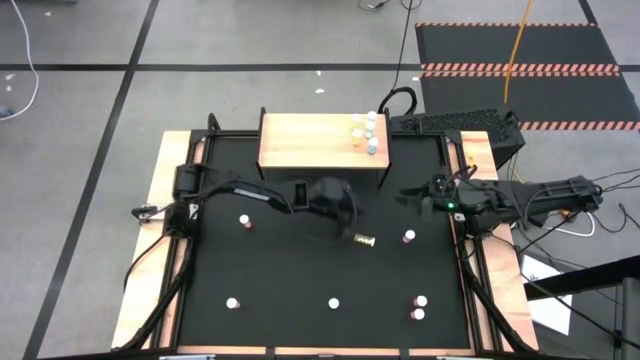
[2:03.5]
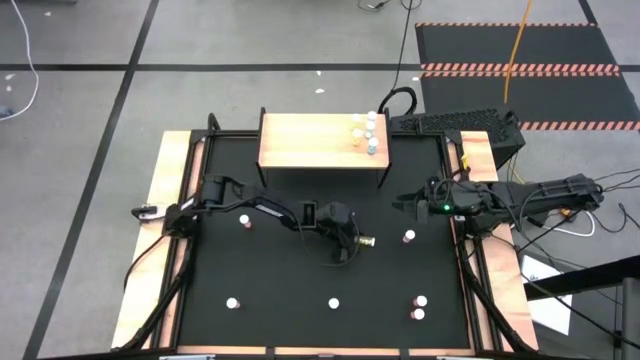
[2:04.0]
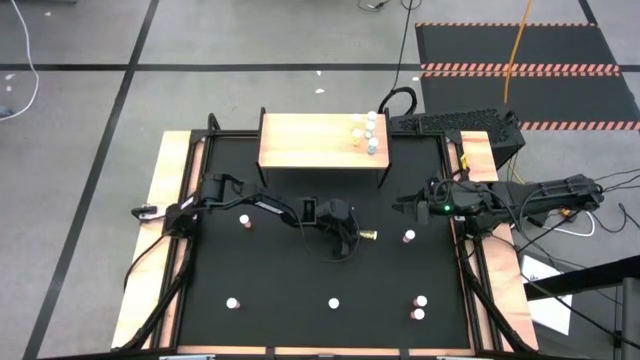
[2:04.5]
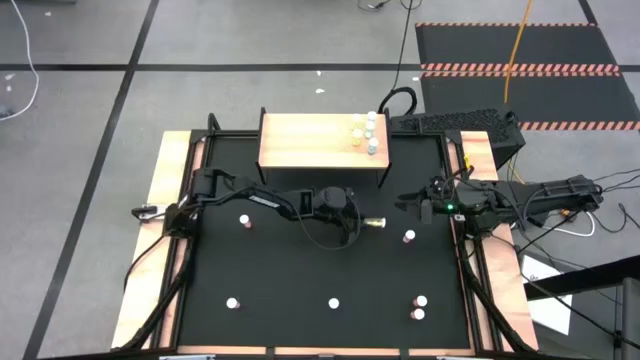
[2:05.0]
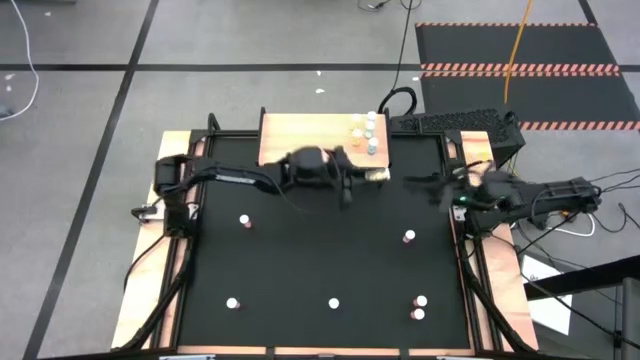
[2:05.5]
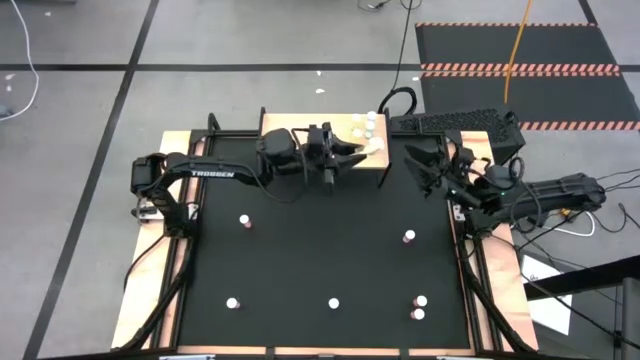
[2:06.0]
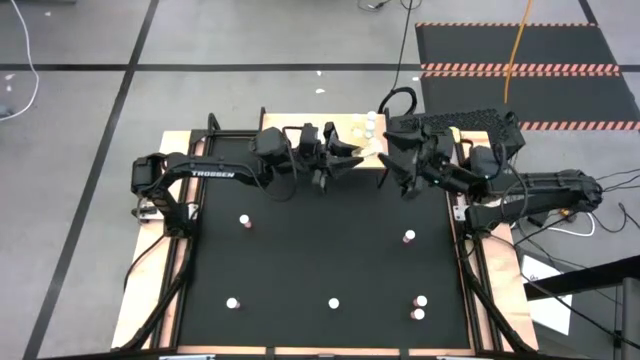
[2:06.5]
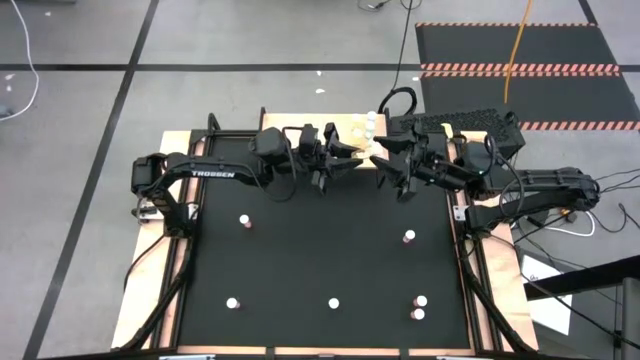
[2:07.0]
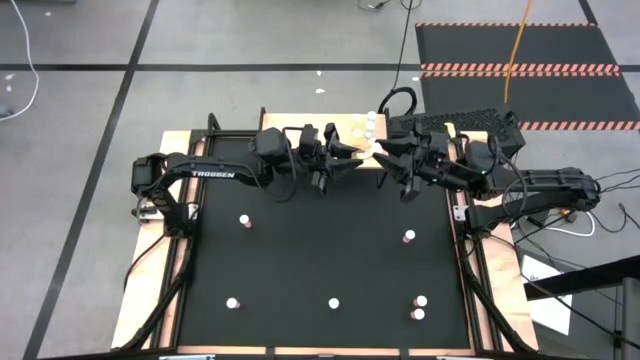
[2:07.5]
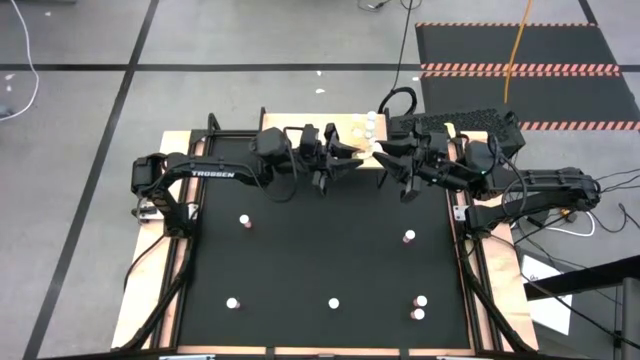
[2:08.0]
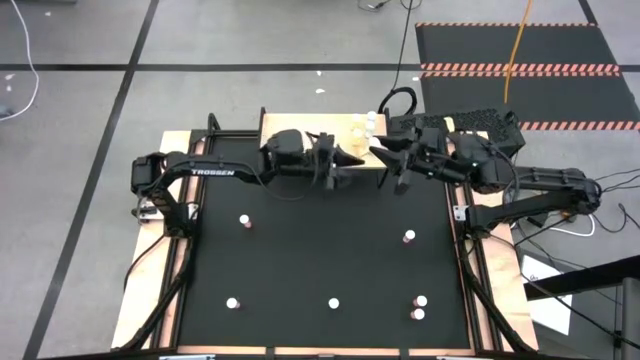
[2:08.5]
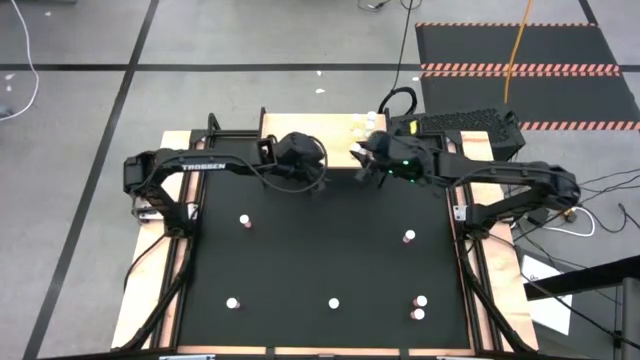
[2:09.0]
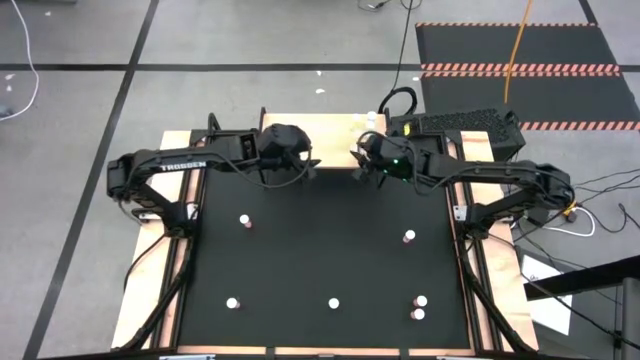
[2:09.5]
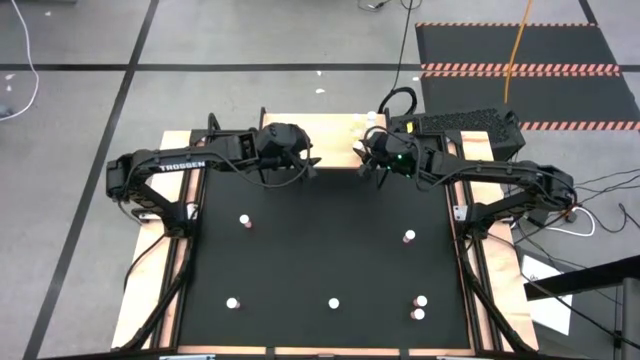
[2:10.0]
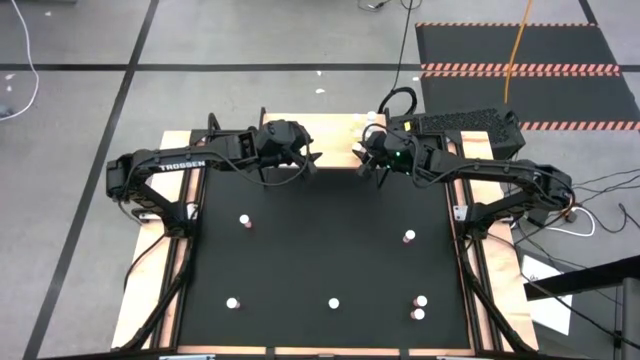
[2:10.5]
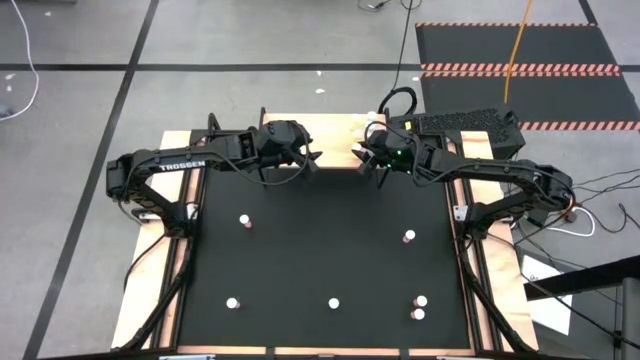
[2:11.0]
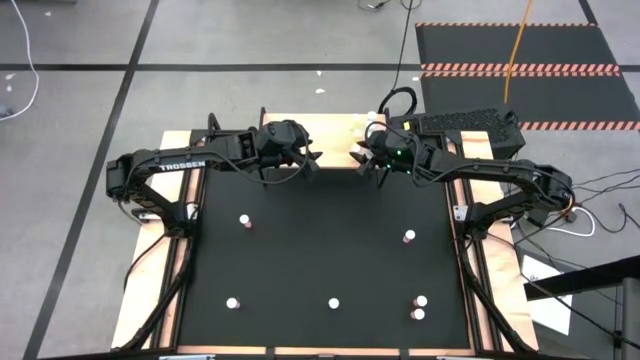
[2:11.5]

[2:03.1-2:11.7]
Task: Pick and place medicine bottles onto shelf by color
Put the yellow pill bottle on the shelf aligned with the other yellow pill bottles

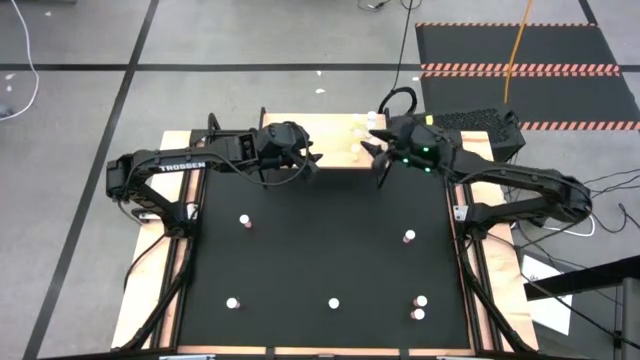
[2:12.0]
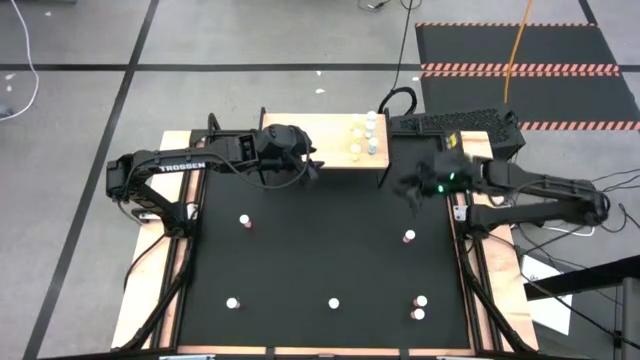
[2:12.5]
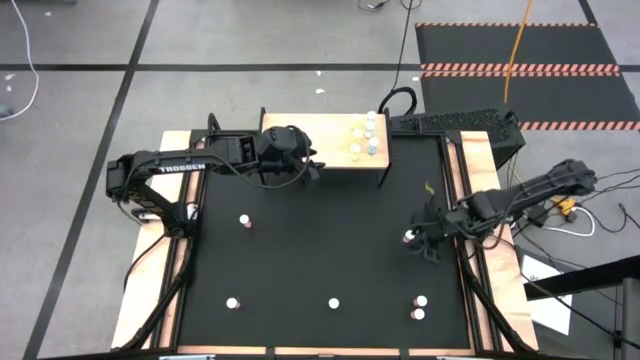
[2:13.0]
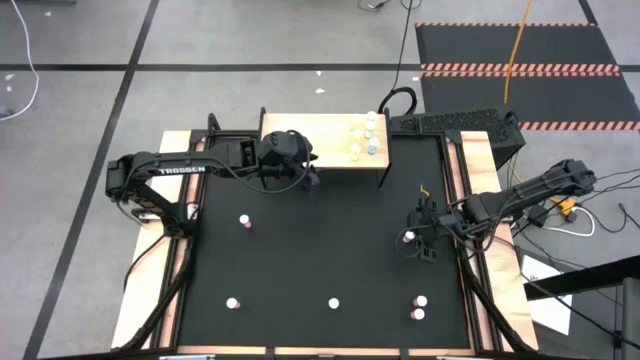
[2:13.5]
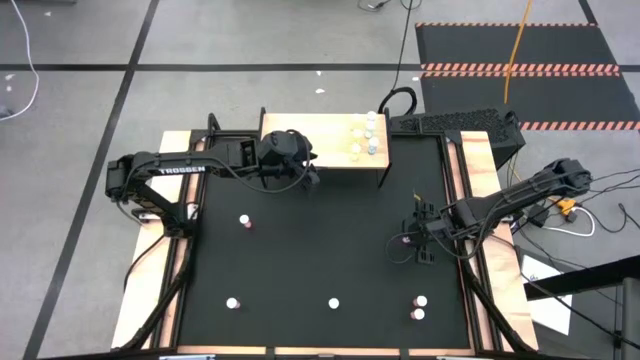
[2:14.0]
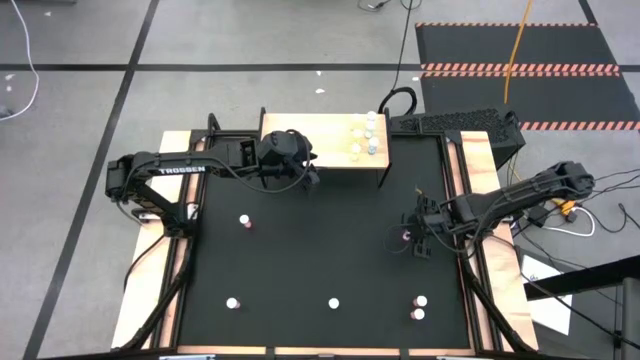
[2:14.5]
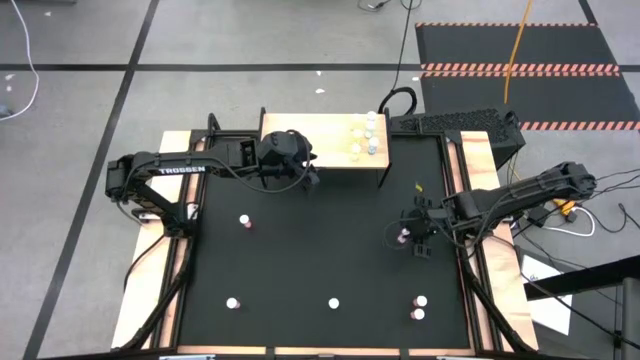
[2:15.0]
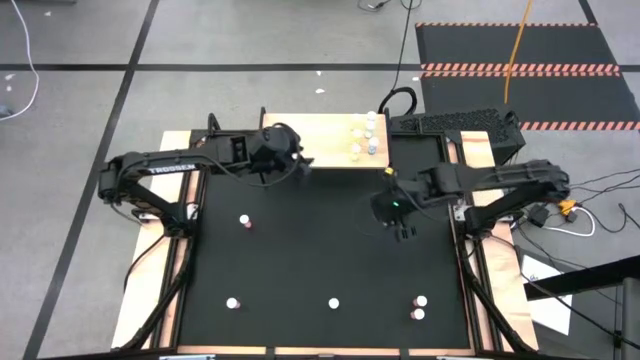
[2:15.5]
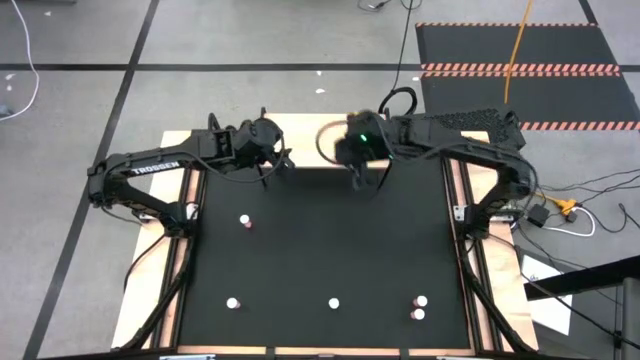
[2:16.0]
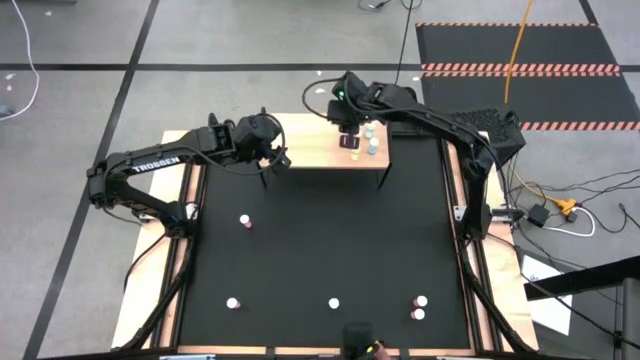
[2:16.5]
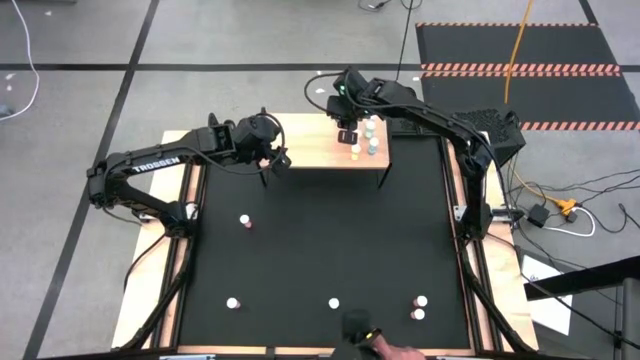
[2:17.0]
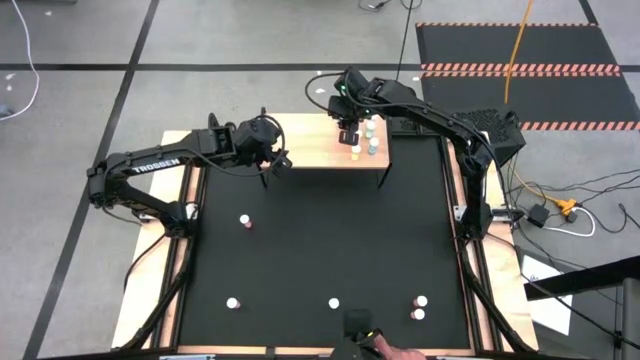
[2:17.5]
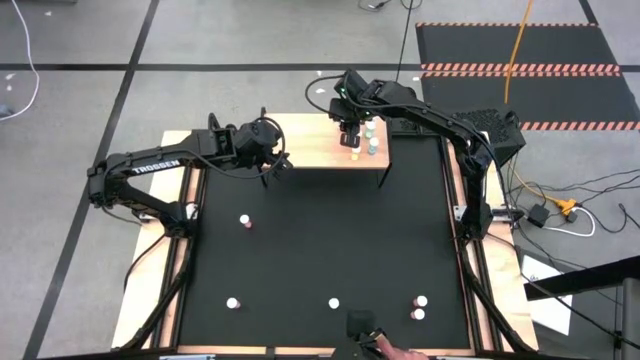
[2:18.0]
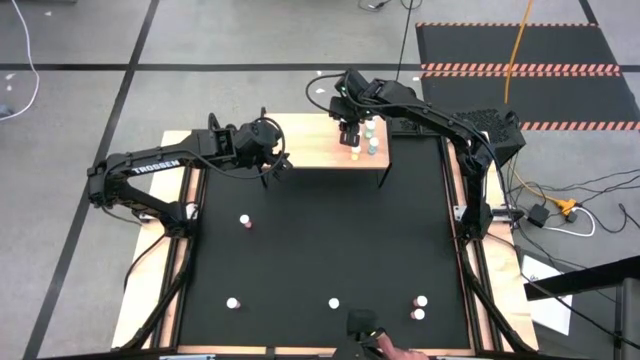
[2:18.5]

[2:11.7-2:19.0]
Put the top right pink pill bottle on the shelf

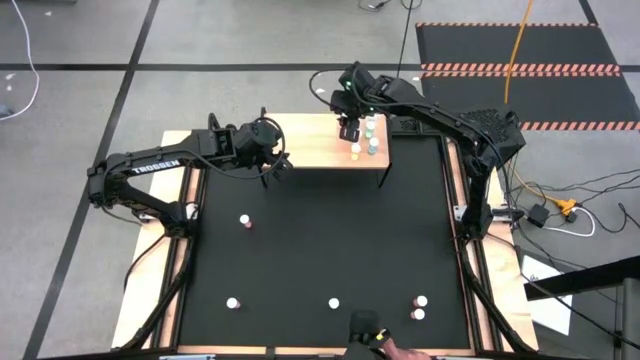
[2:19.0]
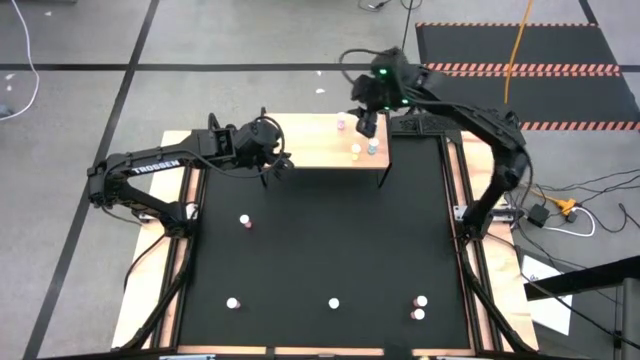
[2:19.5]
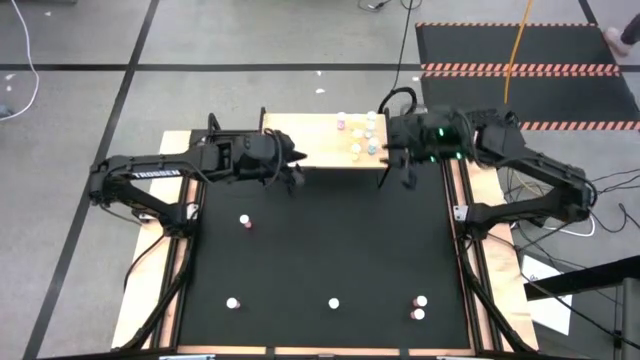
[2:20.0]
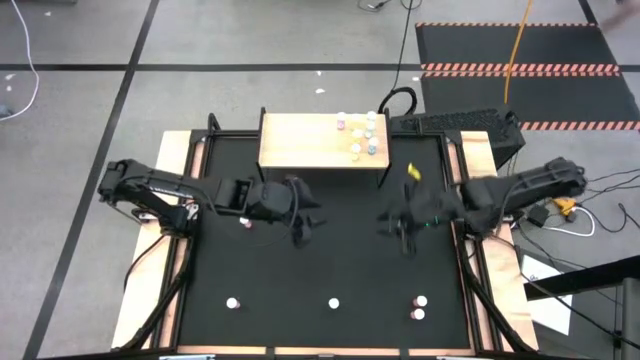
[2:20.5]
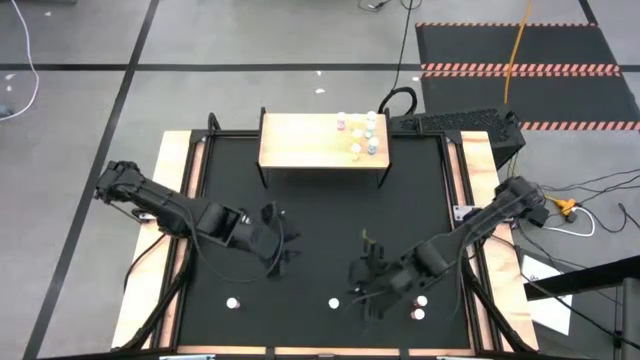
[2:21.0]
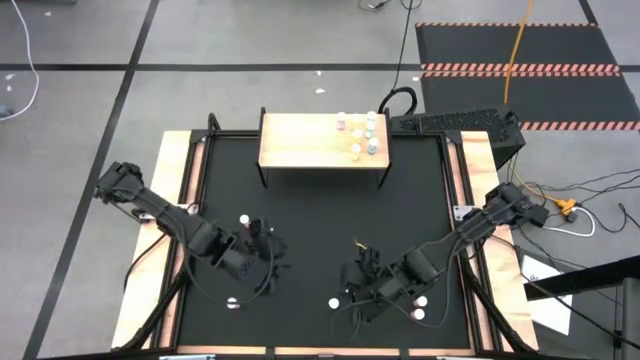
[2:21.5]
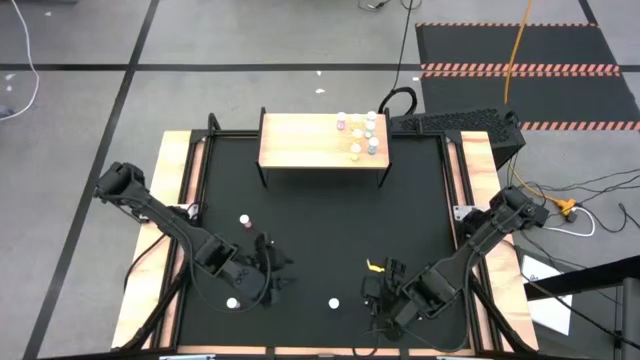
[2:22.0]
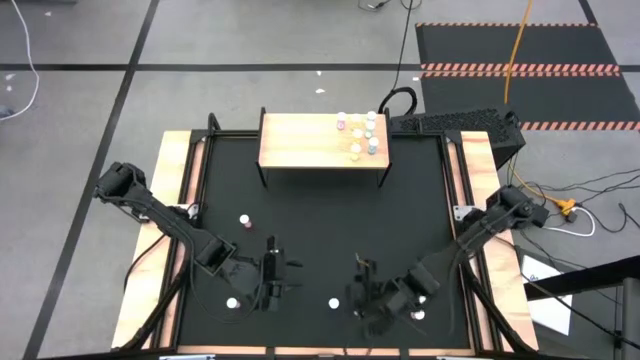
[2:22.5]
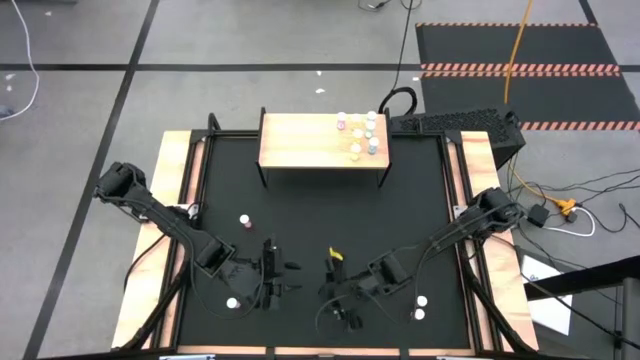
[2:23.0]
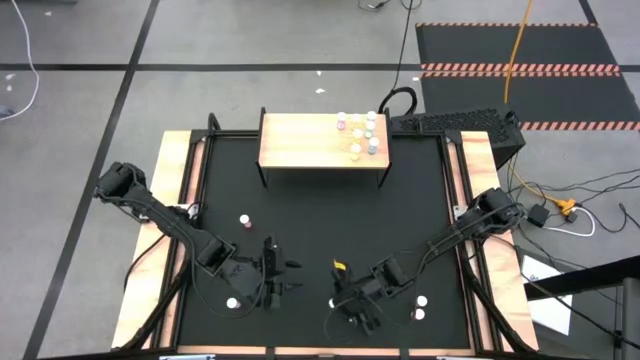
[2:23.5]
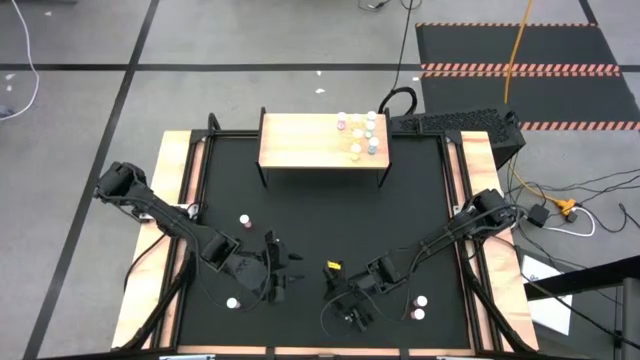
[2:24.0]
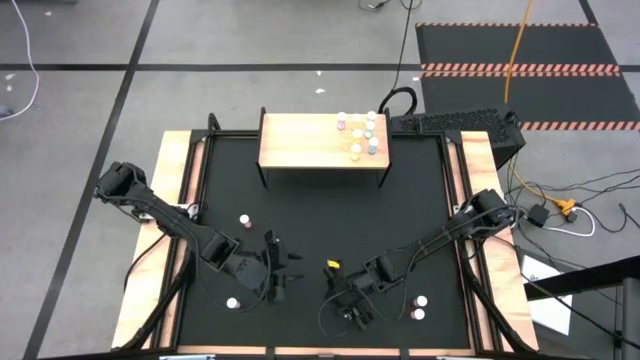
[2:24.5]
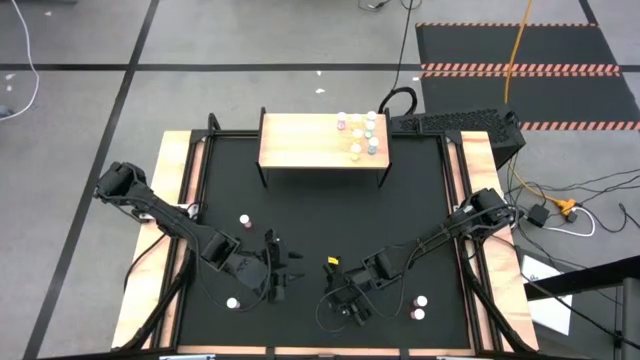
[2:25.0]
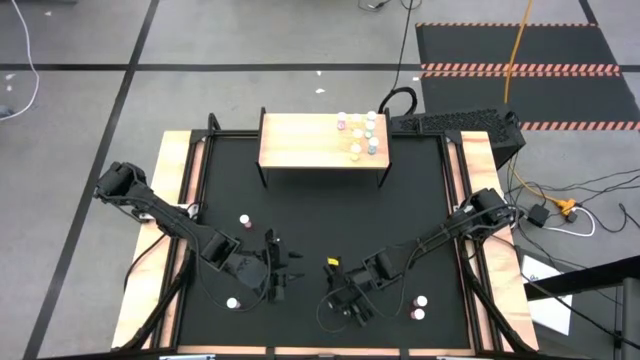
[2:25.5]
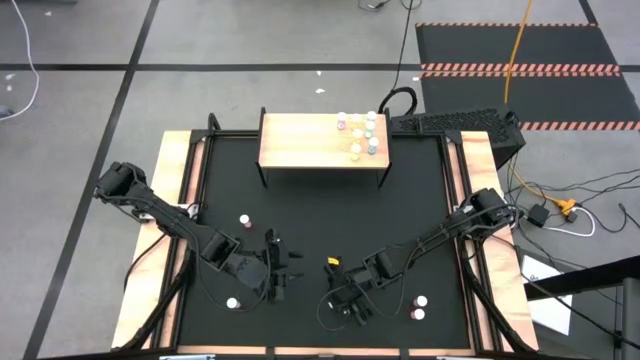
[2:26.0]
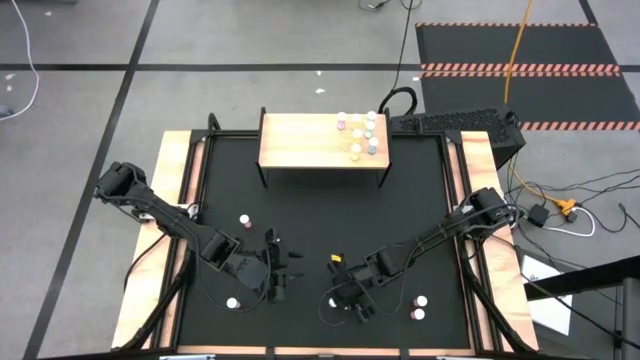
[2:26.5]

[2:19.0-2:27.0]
Put the right pink pill bottle on the shelf aligned with the other pink pill bottle
